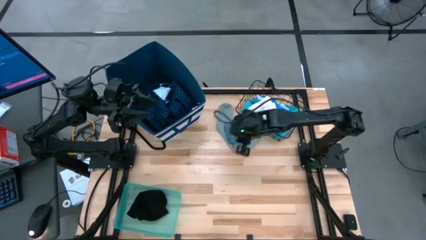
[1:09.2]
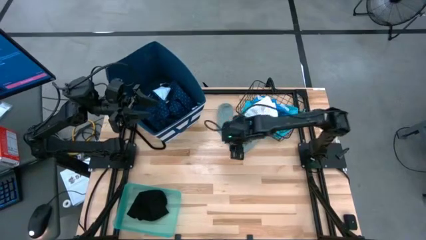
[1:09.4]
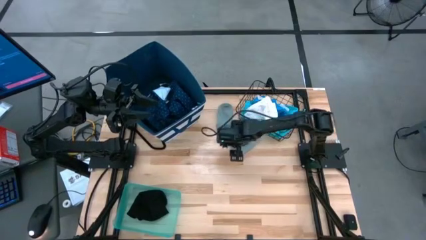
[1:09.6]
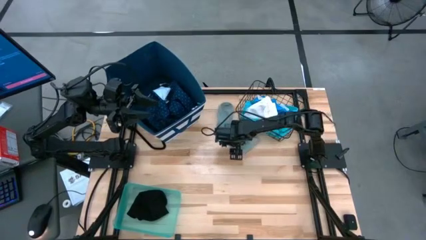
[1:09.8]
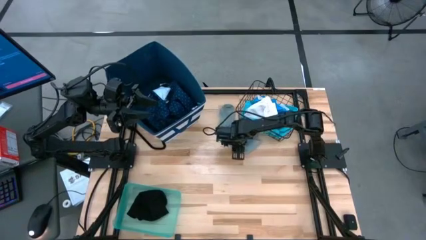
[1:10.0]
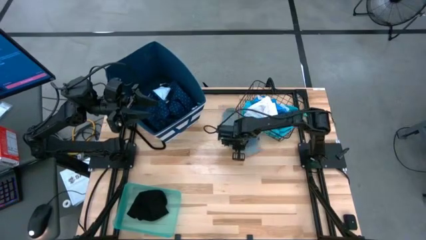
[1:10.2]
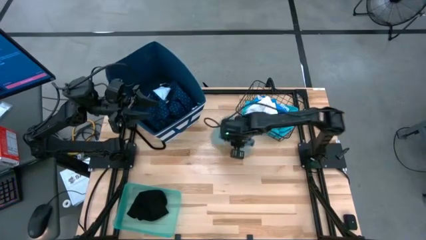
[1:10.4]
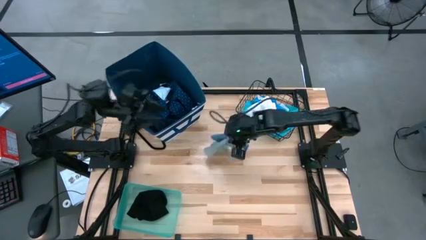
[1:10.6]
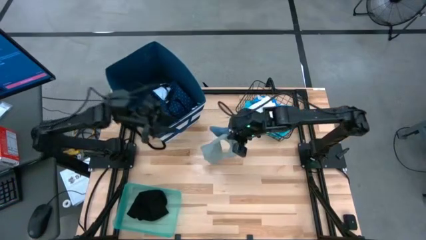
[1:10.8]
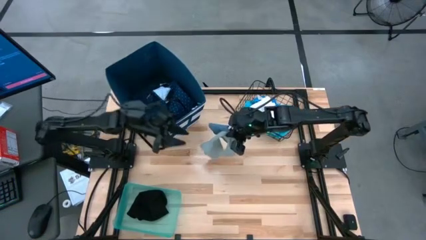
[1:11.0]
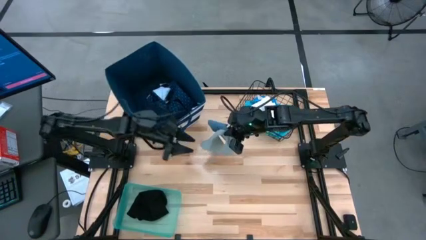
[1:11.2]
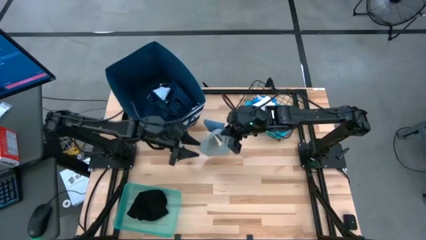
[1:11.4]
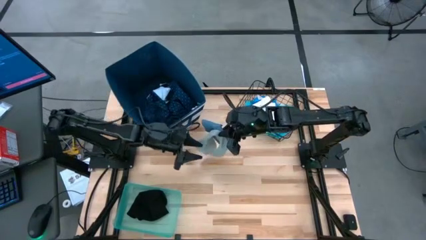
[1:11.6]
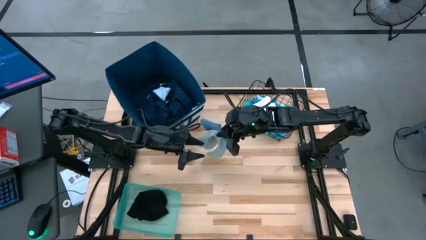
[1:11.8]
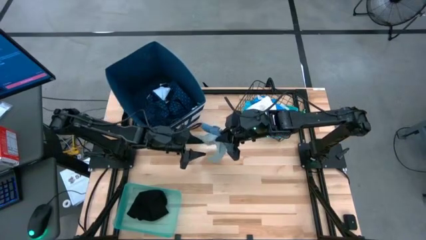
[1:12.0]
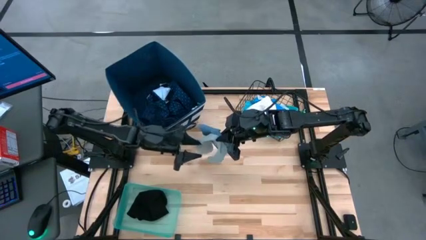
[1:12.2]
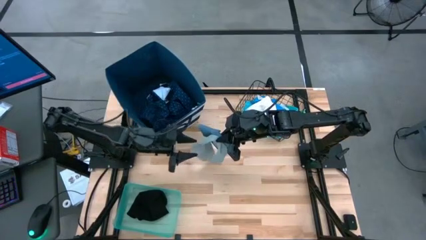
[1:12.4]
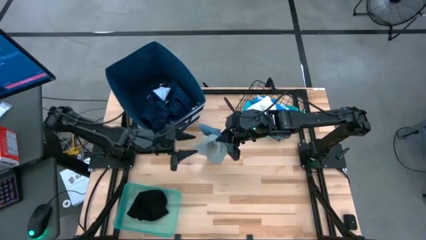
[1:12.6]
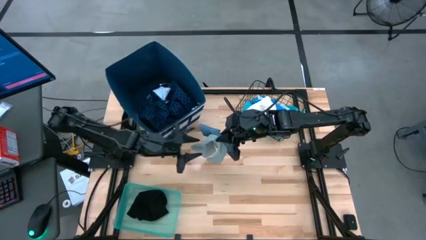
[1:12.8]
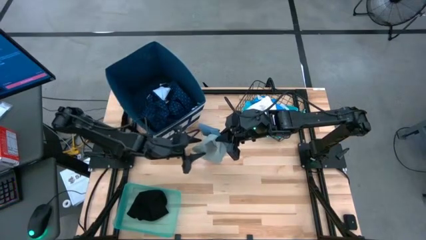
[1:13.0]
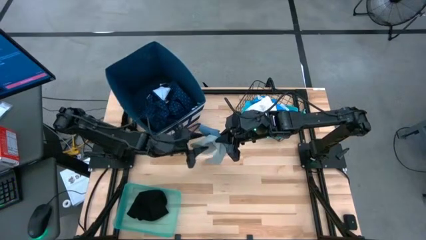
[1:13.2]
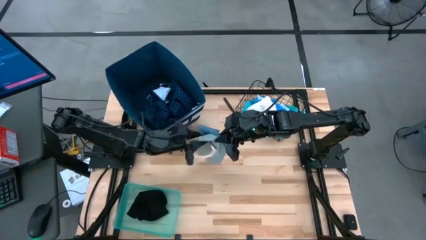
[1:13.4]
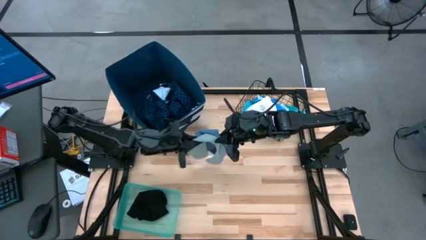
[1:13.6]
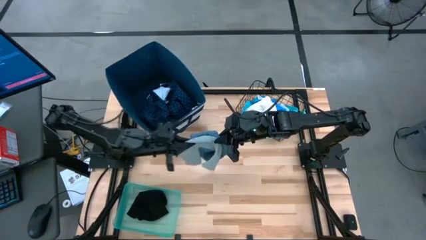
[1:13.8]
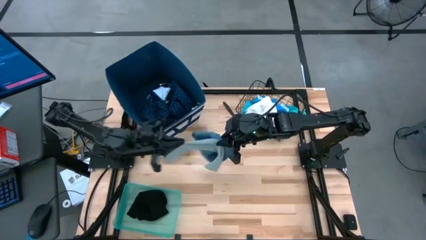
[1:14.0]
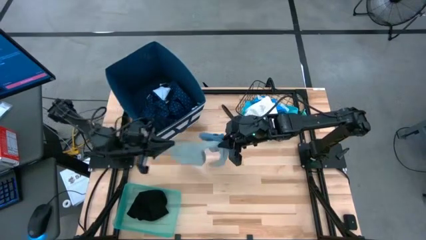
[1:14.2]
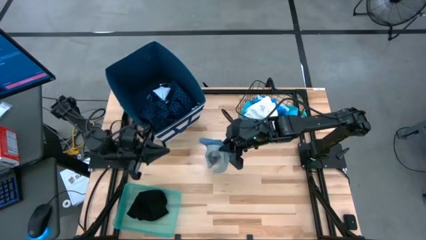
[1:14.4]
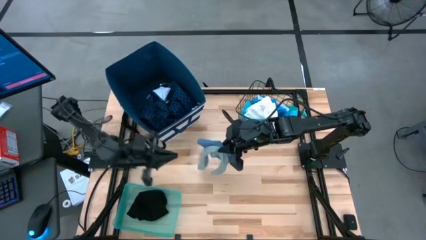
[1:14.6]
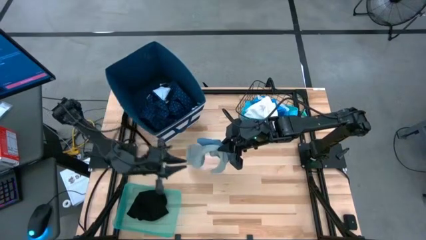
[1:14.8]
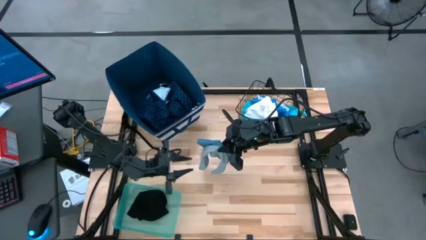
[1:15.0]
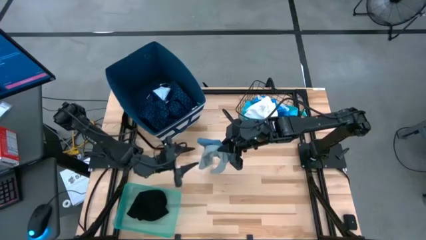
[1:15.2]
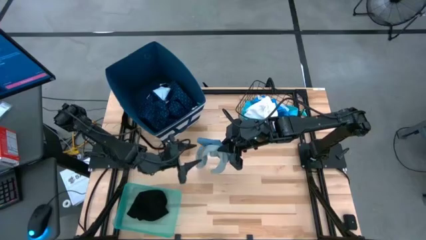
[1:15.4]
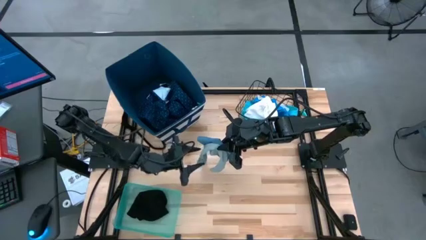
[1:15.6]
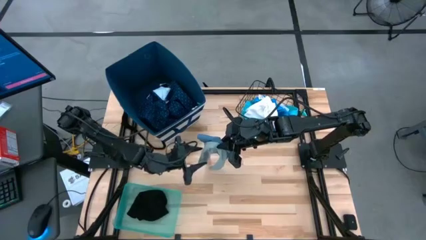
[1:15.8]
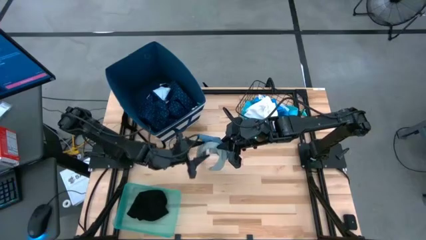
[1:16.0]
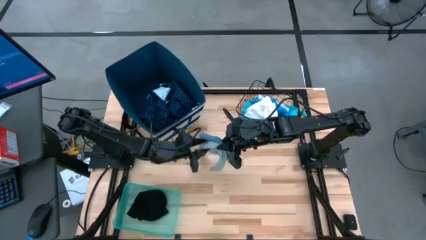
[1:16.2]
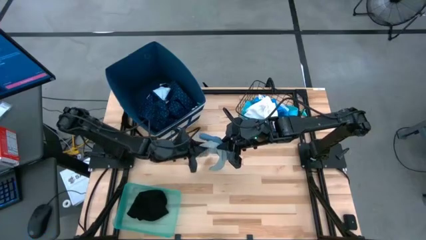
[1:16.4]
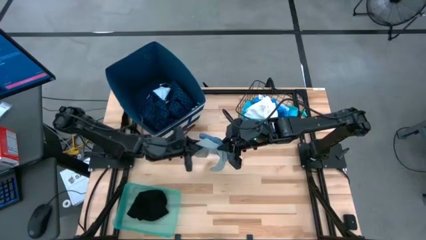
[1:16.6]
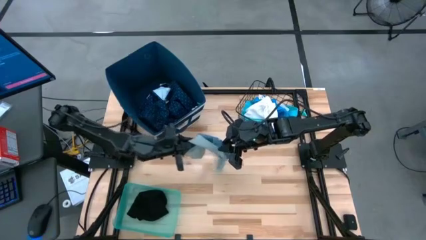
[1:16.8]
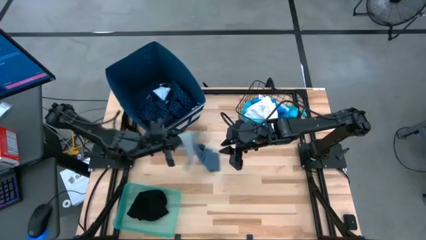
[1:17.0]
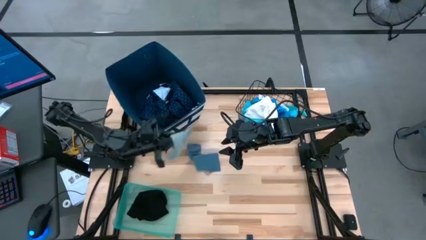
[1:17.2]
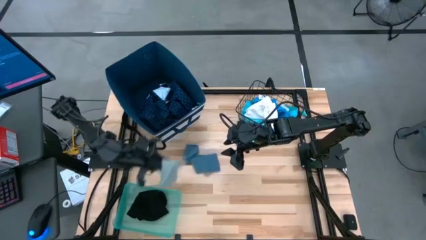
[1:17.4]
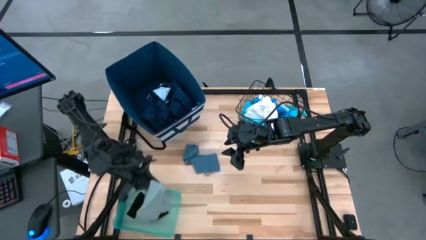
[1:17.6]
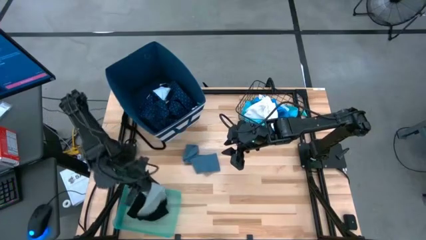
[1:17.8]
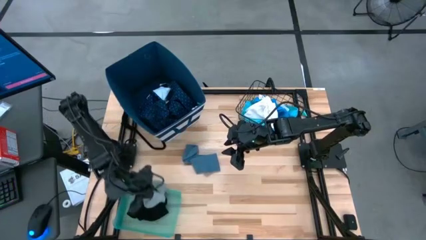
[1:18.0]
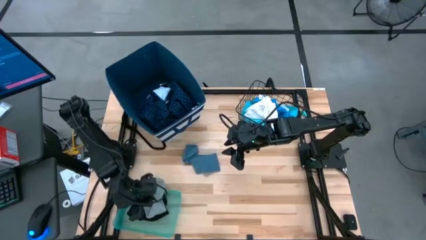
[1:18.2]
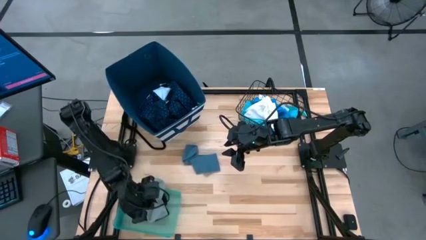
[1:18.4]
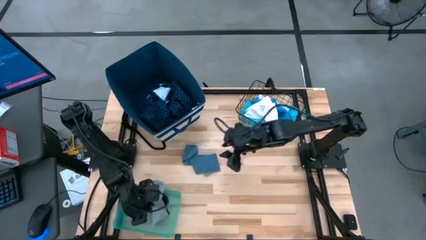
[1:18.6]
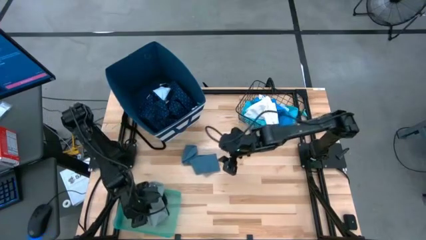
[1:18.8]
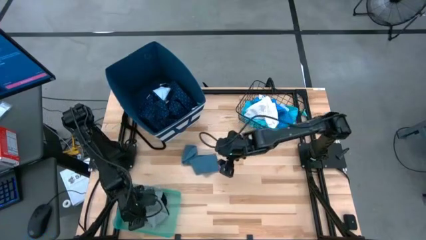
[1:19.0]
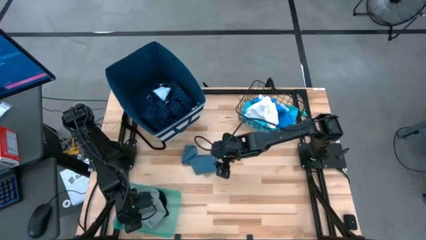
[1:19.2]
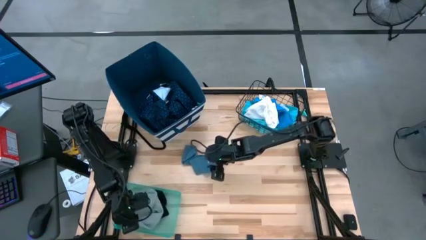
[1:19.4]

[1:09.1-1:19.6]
Task: Pick & Place Cloths
Put the gray sock into the blue bin

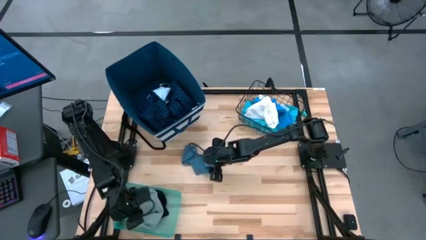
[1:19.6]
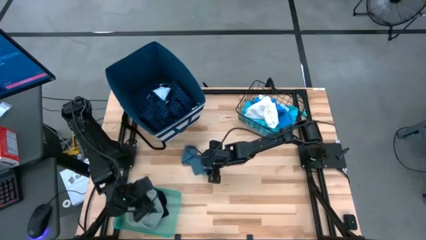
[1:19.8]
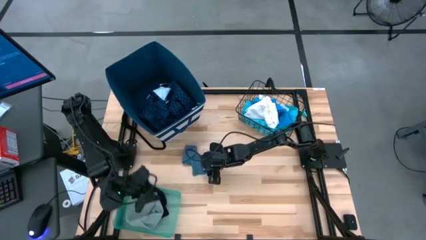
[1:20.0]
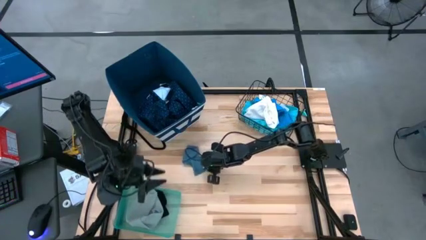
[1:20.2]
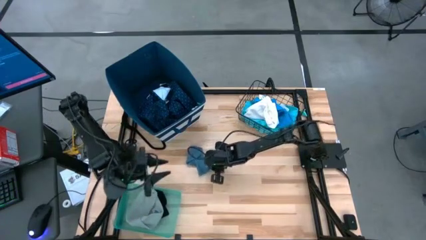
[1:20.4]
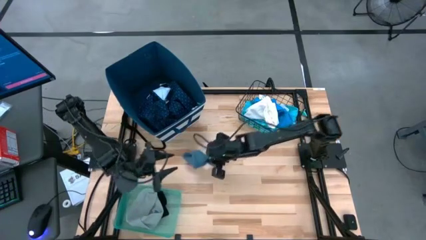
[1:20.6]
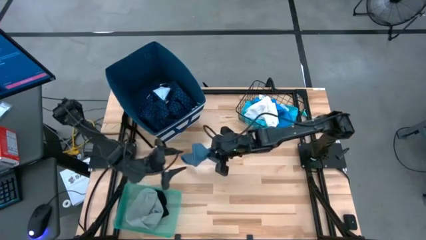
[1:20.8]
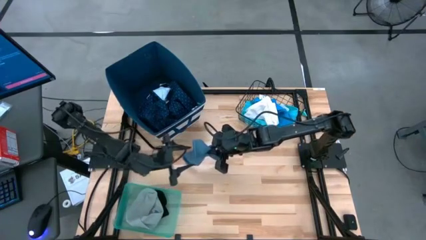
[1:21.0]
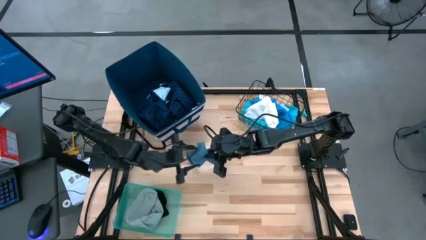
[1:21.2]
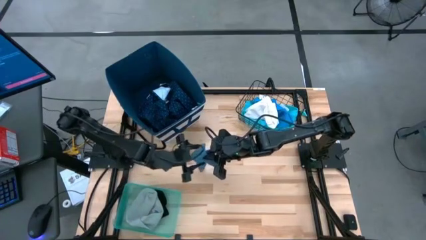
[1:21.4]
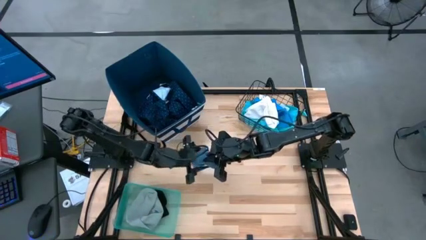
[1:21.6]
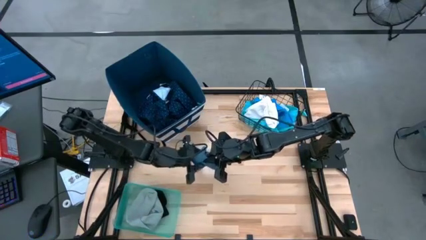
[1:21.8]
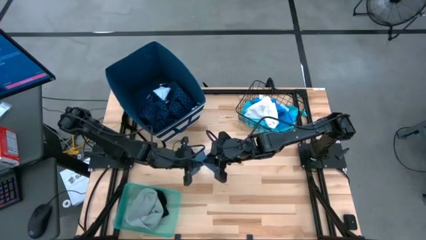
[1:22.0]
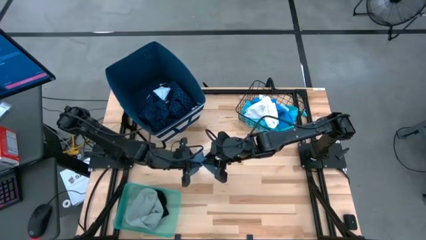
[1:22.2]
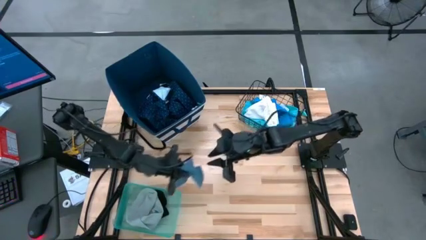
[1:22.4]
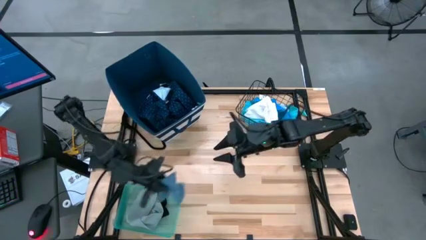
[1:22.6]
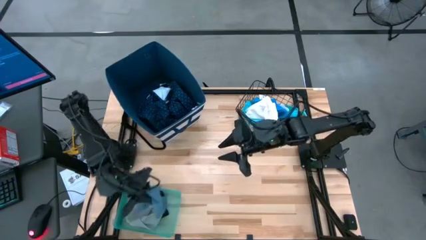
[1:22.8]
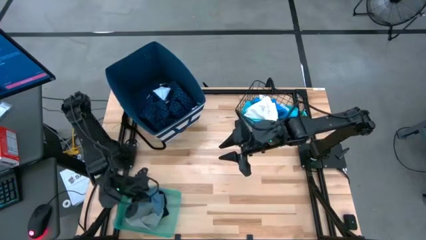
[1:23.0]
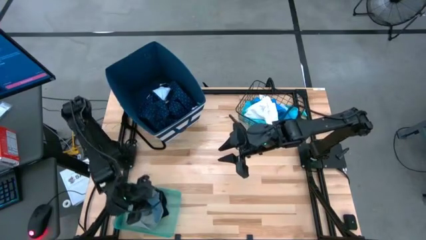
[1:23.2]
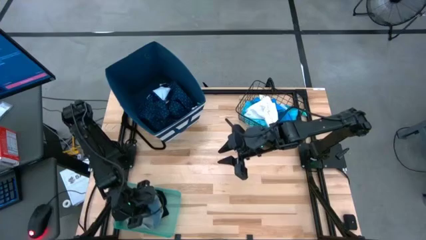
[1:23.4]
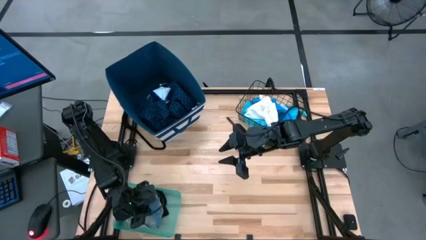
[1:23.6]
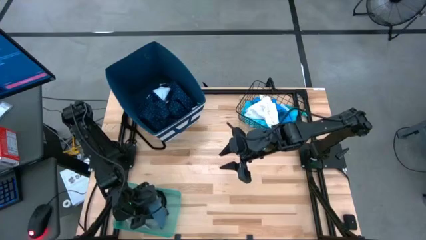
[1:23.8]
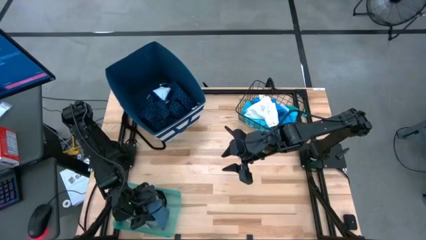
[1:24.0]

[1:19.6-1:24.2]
Put the blue sock into the blue bin
